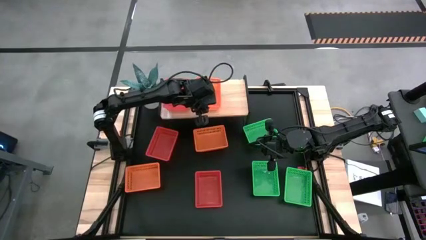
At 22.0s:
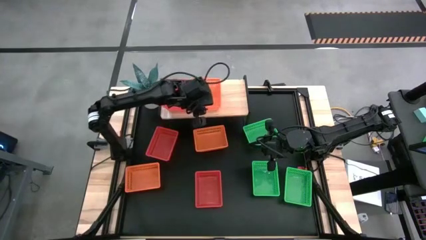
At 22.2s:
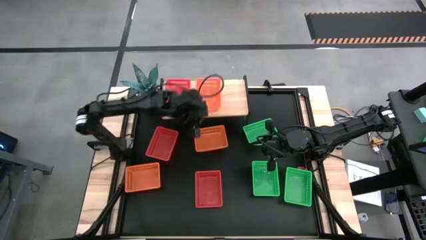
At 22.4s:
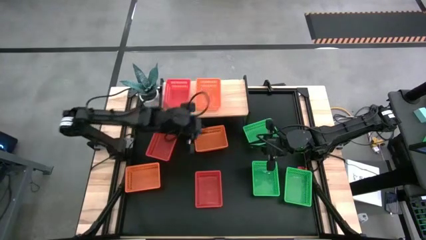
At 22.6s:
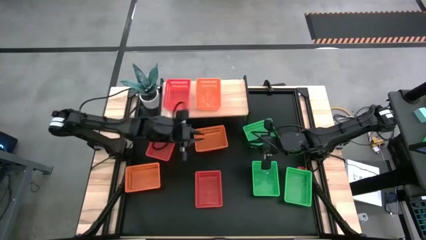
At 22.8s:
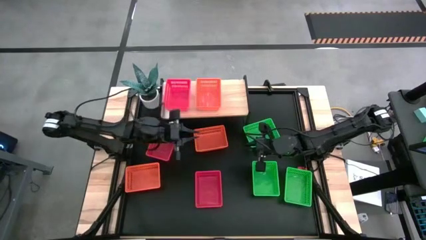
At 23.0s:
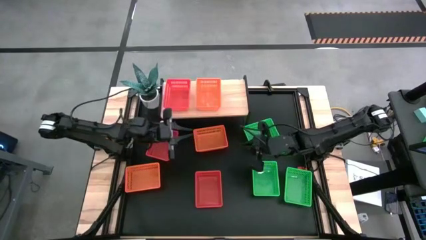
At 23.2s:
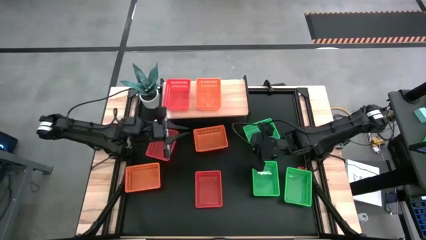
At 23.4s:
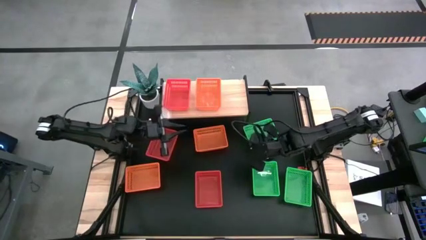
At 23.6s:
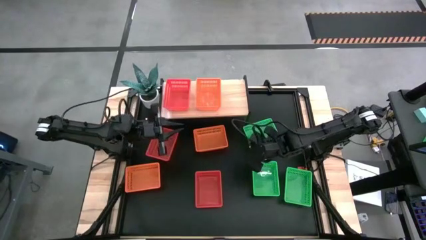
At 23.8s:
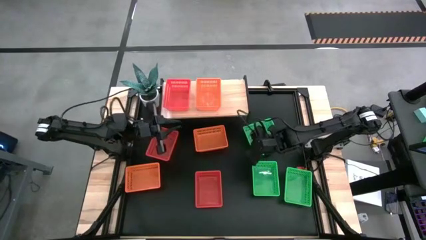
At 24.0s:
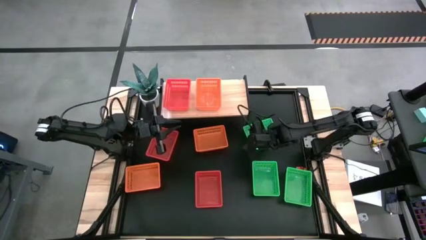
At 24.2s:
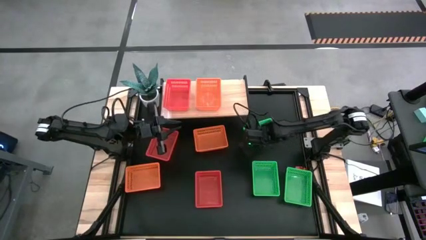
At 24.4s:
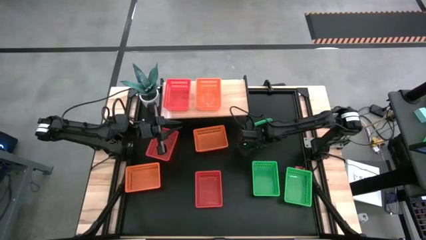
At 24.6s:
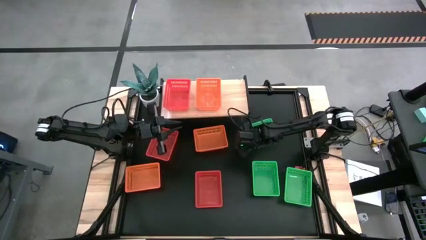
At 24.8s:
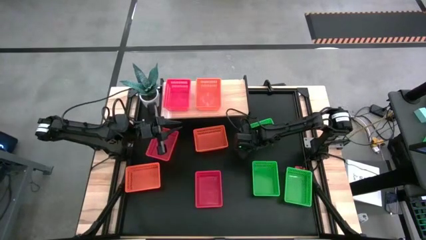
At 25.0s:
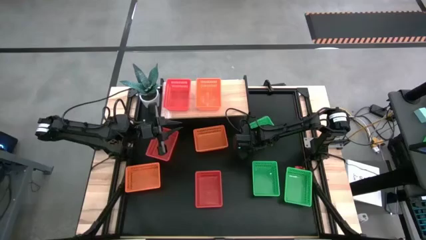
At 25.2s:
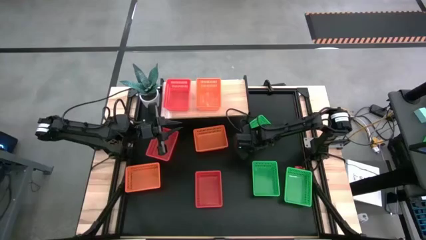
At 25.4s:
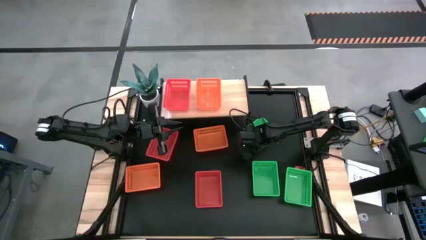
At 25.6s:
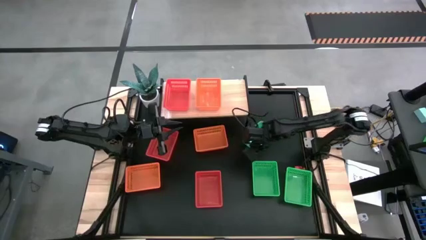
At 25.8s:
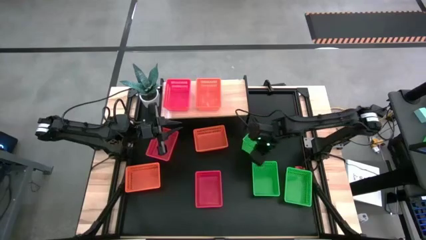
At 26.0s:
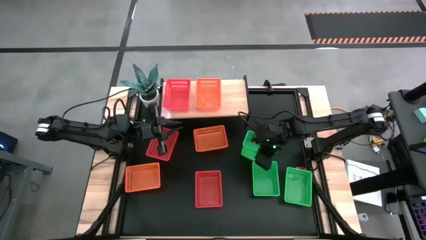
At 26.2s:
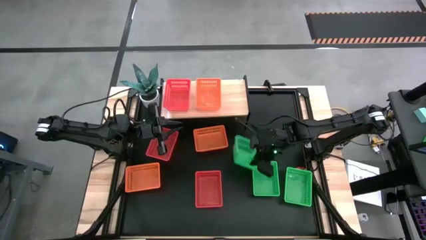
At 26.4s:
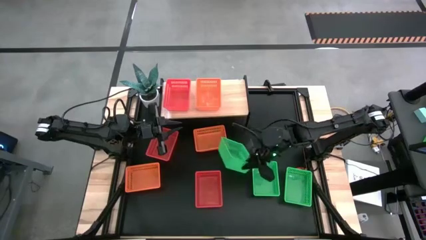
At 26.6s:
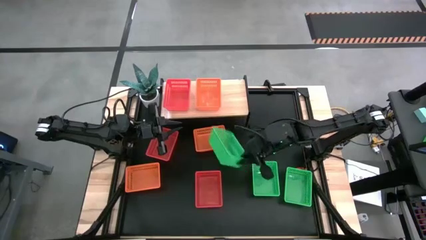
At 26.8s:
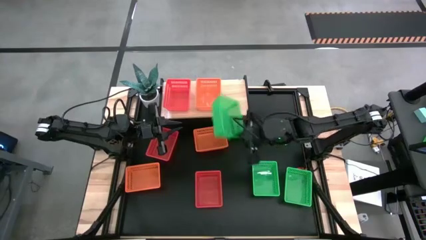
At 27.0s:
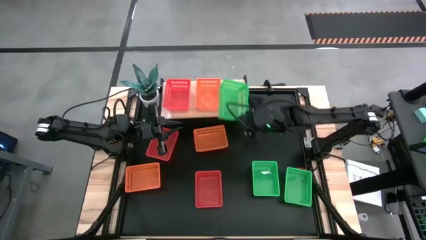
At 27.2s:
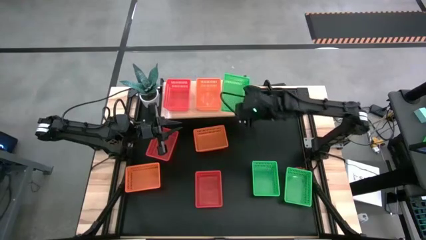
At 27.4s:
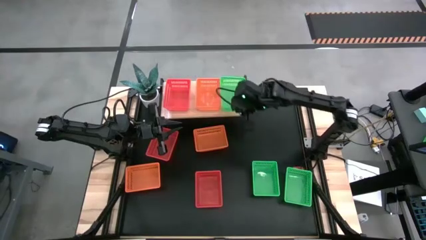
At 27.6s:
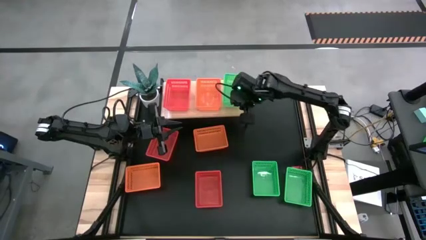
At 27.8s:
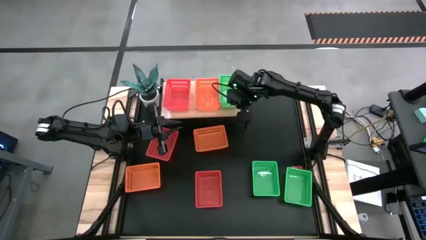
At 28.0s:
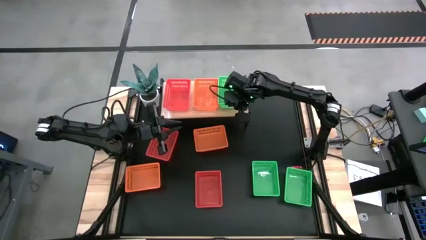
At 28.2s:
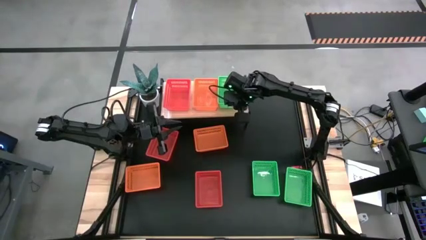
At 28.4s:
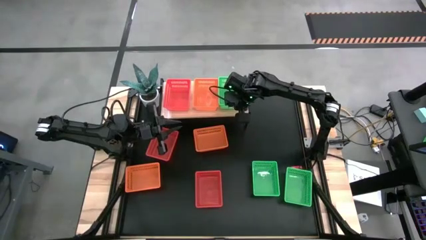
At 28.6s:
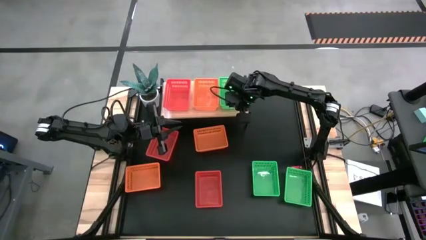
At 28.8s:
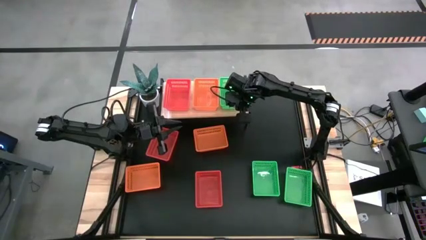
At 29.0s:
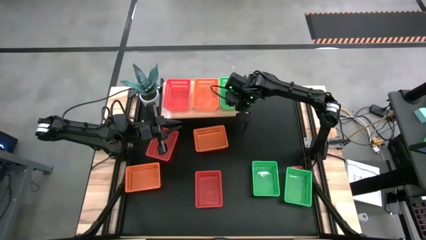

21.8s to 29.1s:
Put the top green basket on the shelf

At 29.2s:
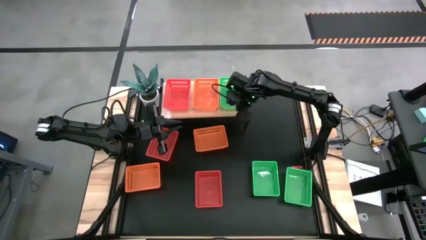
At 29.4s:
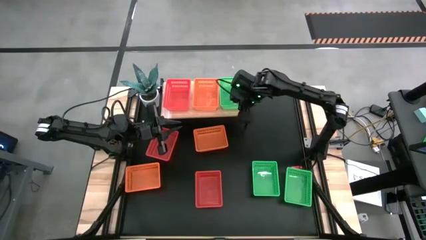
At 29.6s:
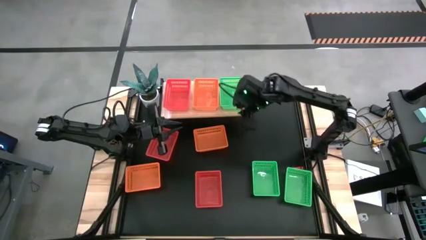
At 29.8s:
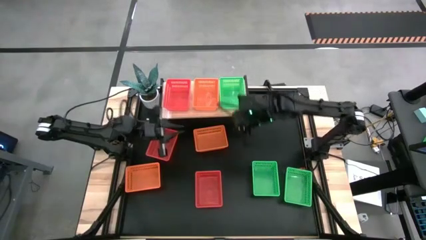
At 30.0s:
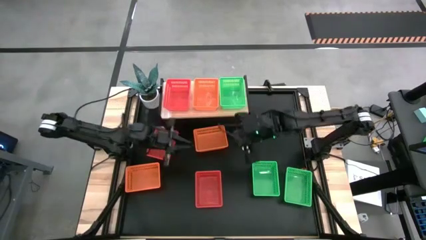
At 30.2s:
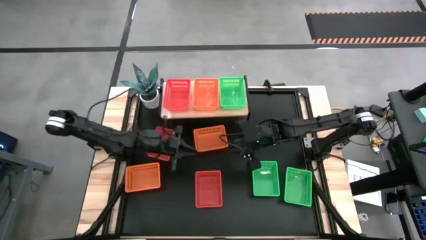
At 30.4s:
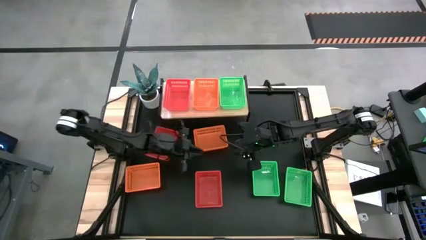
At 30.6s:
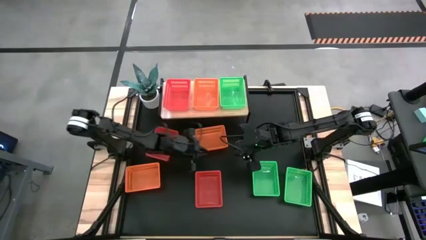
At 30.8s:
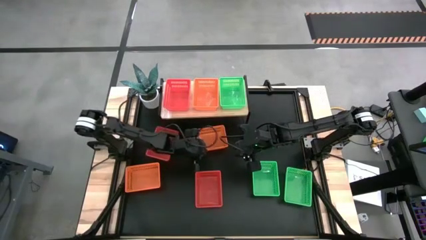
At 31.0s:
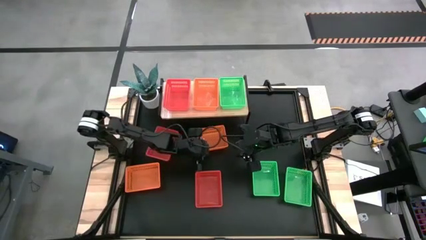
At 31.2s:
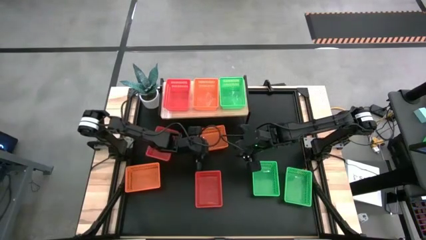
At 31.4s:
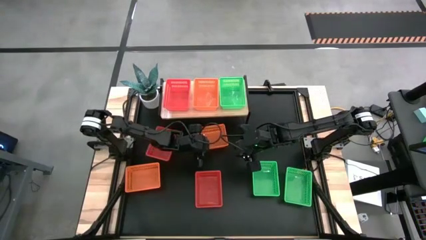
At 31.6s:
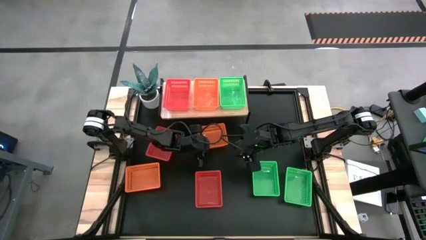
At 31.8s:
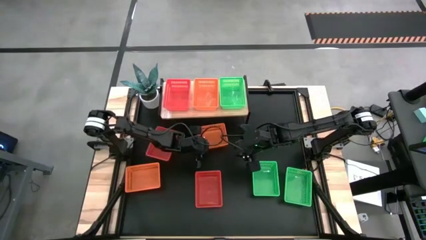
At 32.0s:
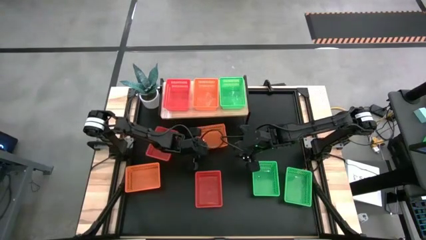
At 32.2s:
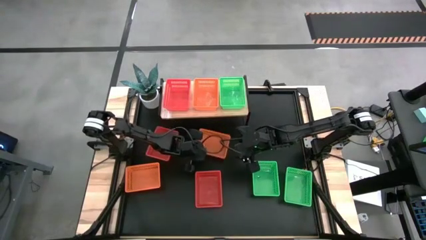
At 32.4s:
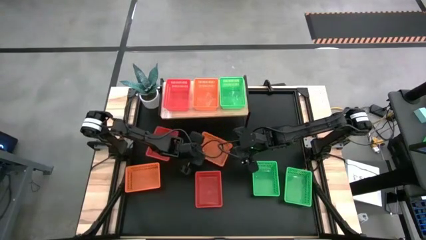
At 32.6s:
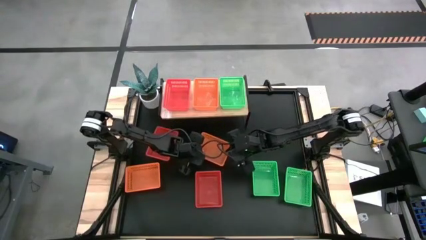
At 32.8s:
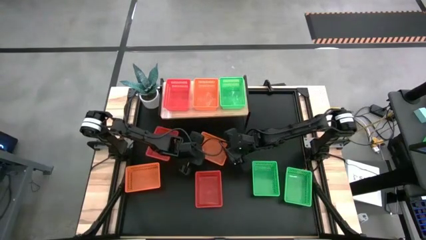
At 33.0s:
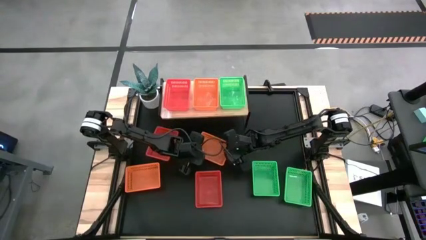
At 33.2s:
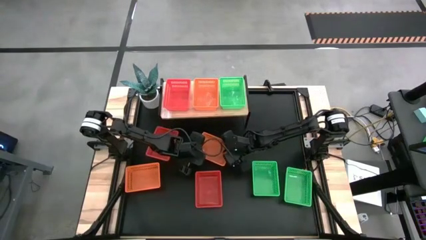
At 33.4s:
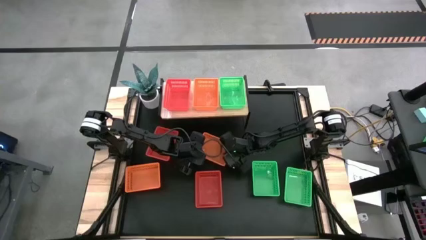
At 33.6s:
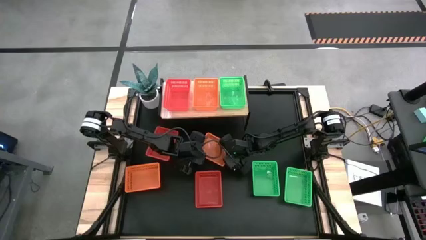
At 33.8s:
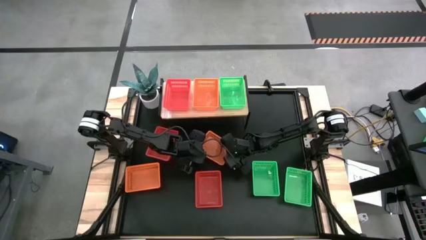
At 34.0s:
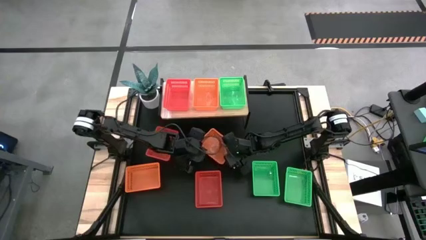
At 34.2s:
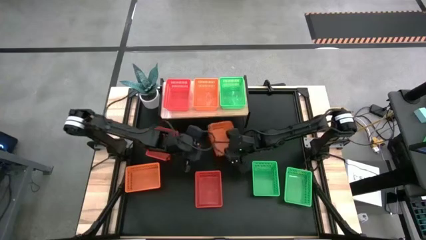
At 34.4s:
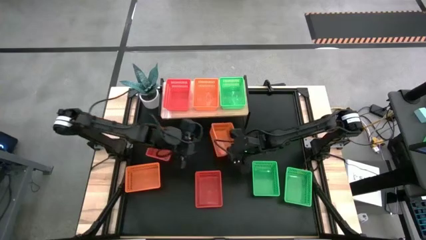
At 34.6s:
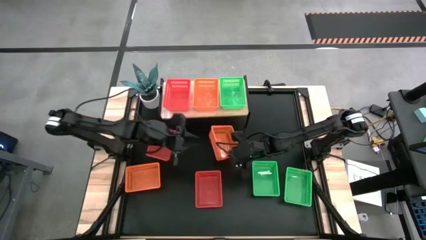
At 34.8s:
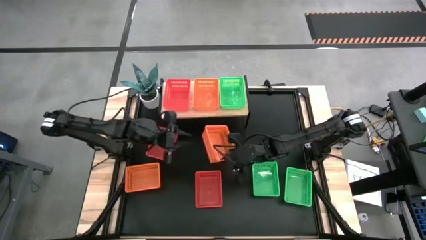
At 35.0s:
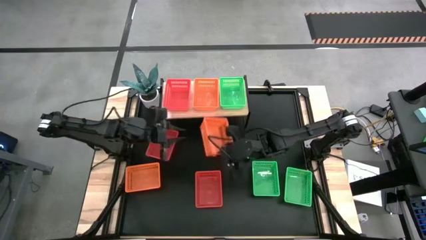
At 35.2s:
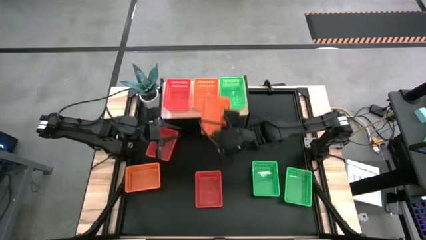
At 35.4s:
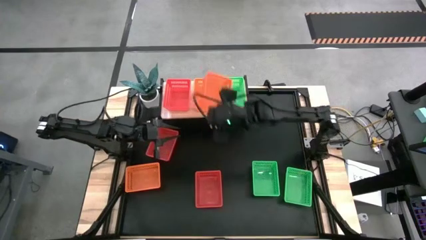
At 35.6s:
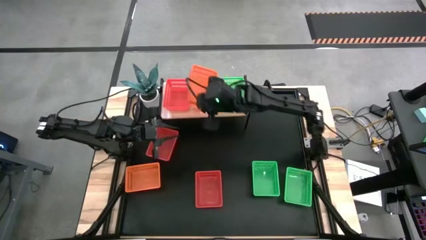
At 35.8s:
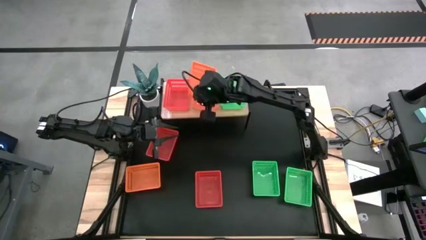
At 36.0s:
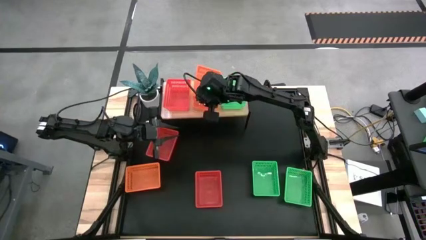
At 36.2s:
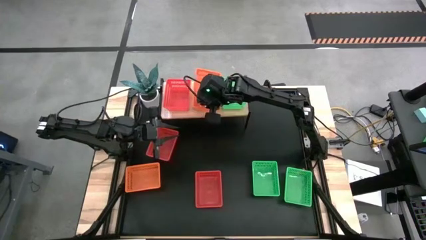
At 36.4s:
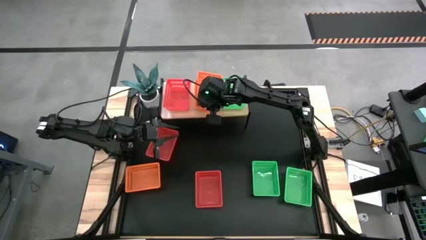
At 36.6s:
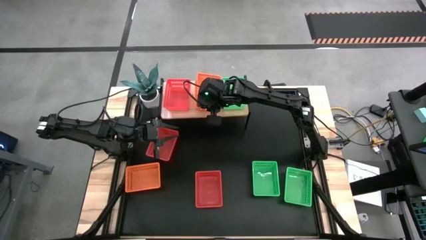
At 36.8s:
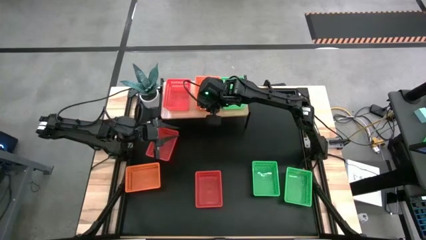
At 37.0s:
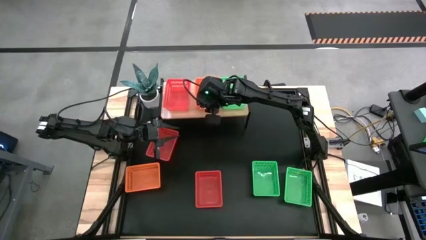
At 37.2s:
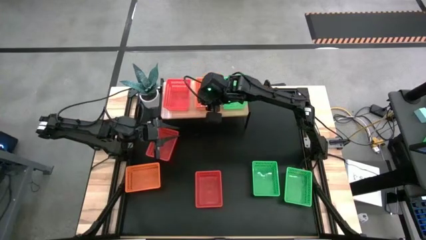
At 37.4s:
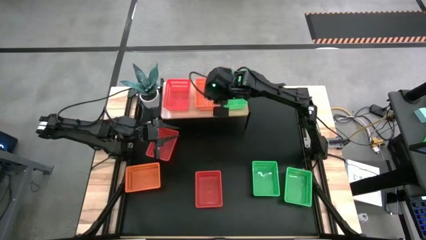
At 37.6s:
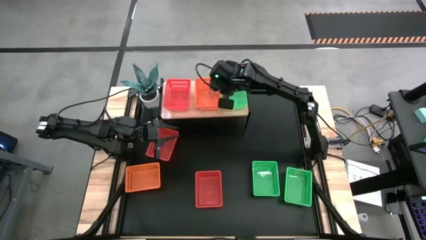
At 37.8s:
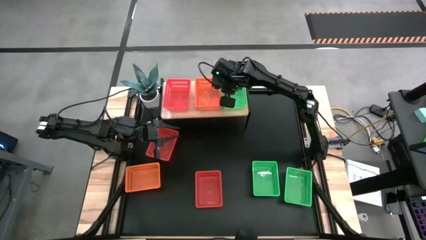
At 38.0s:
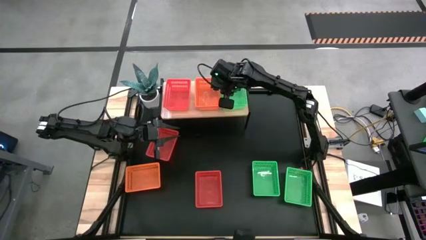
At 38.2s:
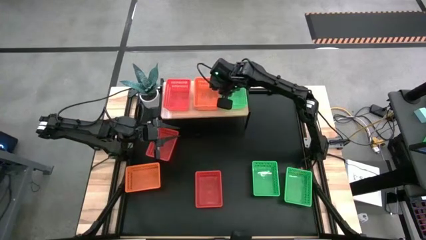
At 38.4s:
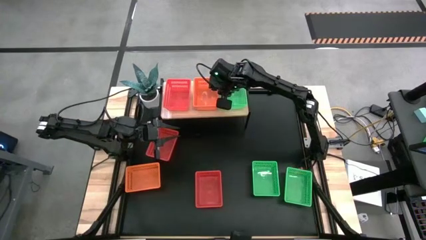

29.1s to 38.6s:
Stack the top orange basket on top of the other orange basket on the shelf
